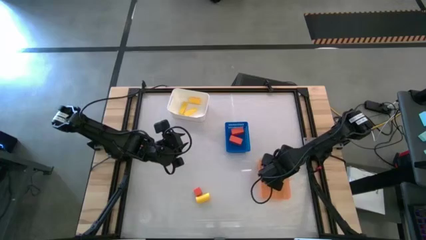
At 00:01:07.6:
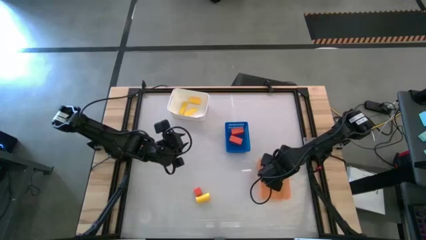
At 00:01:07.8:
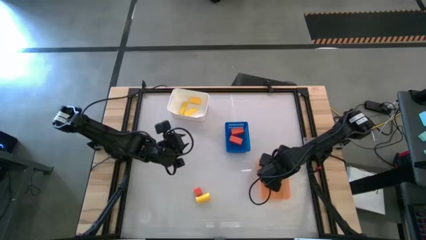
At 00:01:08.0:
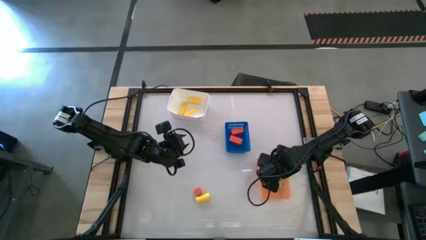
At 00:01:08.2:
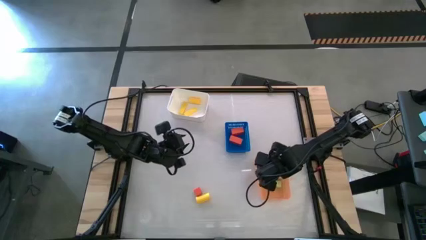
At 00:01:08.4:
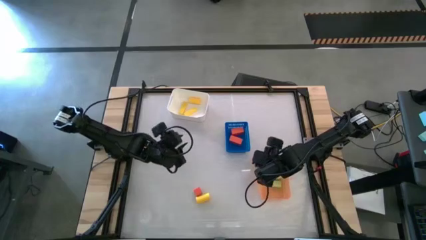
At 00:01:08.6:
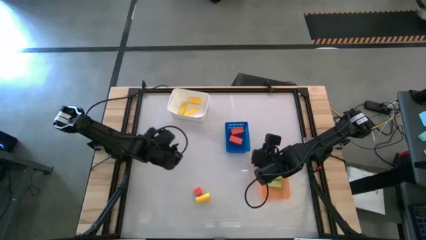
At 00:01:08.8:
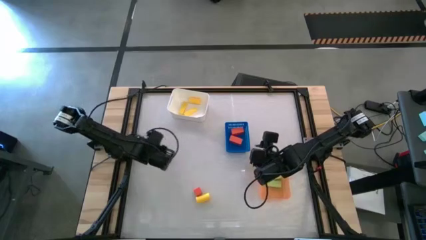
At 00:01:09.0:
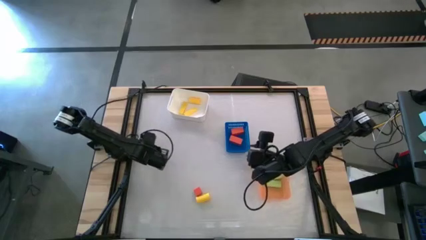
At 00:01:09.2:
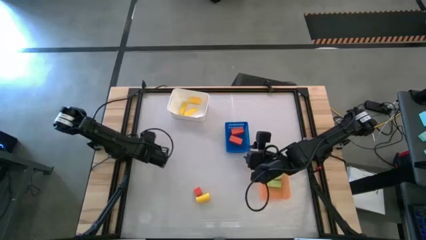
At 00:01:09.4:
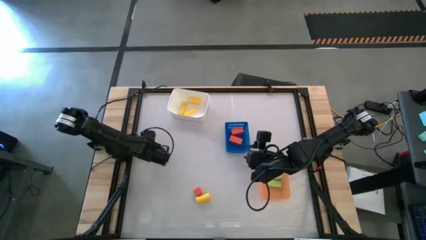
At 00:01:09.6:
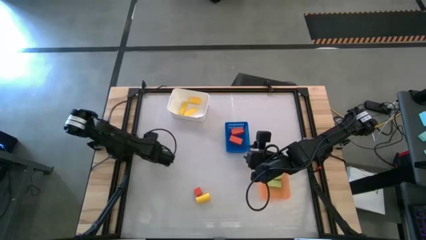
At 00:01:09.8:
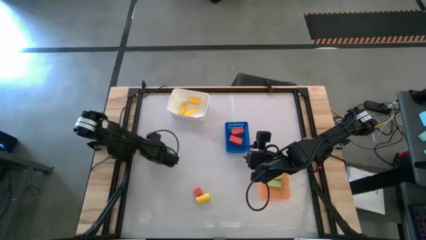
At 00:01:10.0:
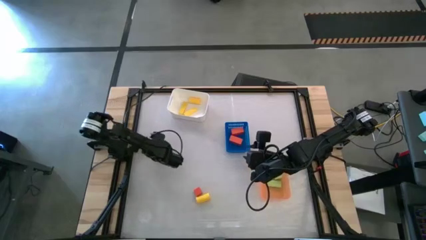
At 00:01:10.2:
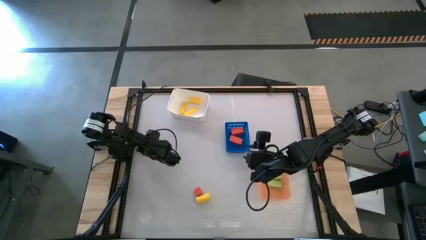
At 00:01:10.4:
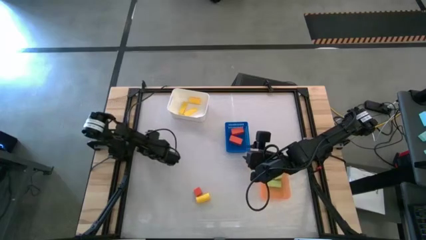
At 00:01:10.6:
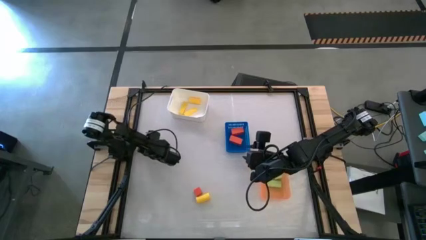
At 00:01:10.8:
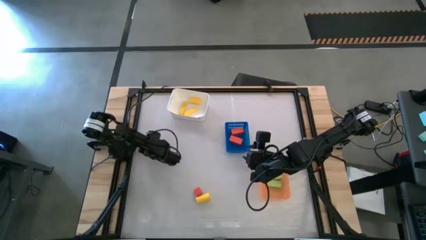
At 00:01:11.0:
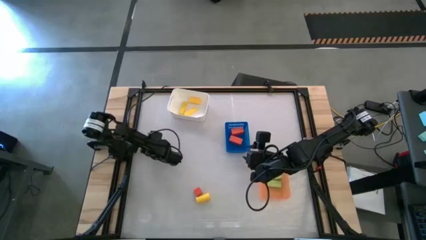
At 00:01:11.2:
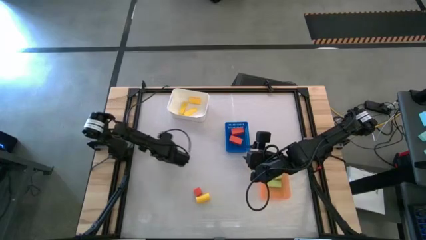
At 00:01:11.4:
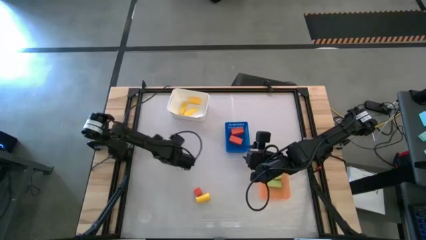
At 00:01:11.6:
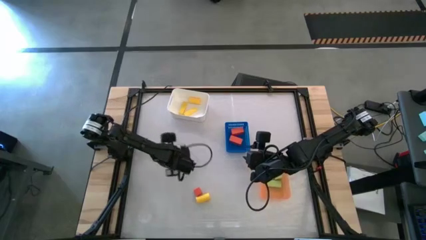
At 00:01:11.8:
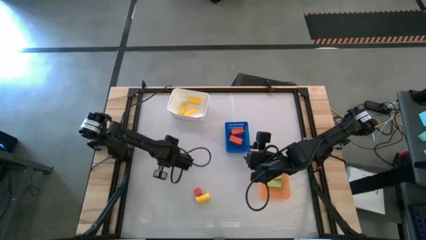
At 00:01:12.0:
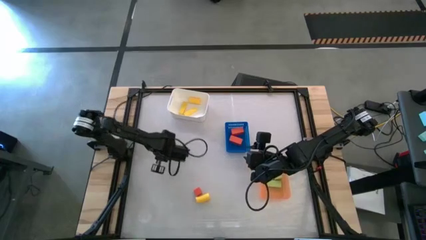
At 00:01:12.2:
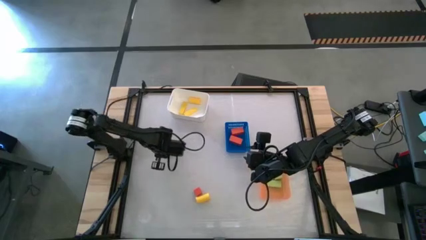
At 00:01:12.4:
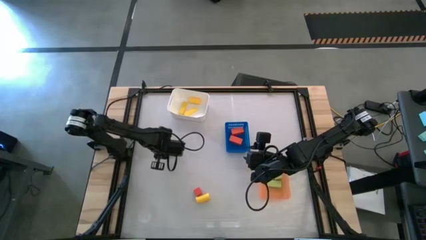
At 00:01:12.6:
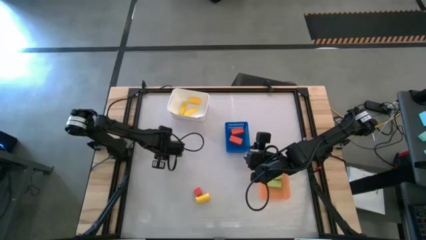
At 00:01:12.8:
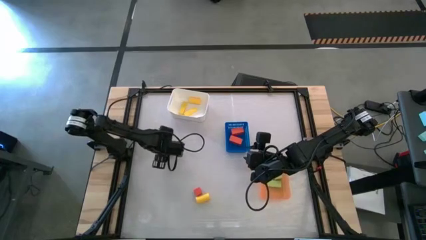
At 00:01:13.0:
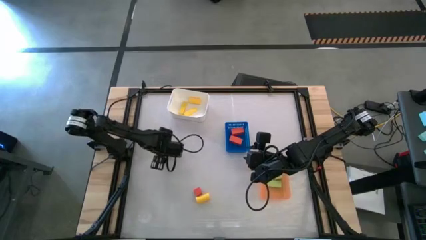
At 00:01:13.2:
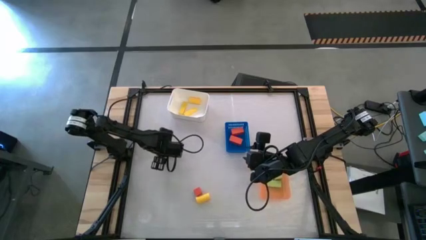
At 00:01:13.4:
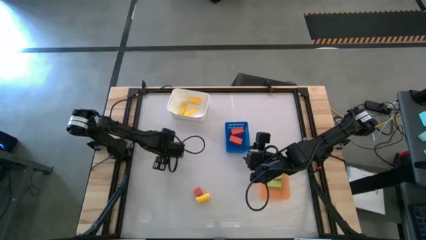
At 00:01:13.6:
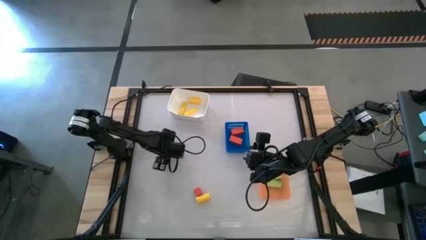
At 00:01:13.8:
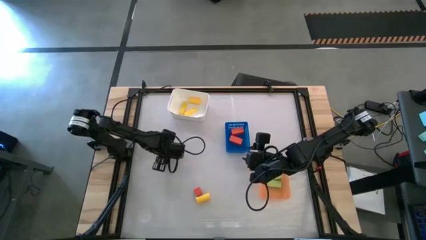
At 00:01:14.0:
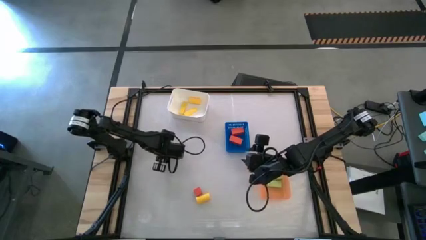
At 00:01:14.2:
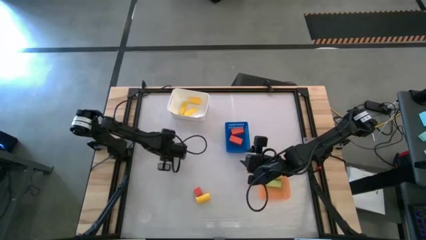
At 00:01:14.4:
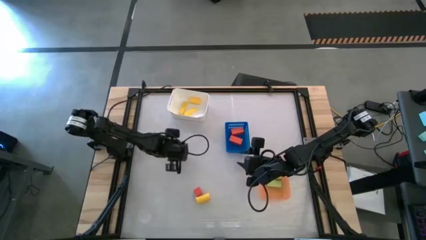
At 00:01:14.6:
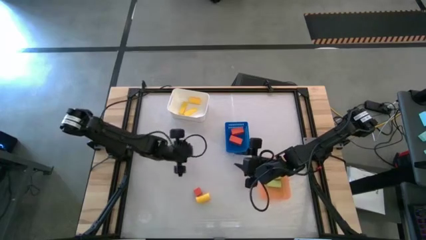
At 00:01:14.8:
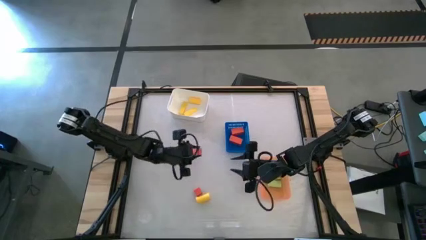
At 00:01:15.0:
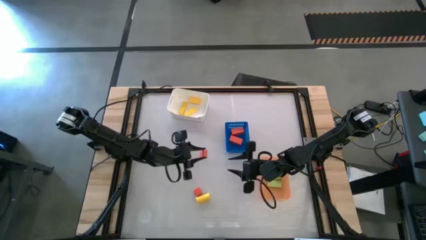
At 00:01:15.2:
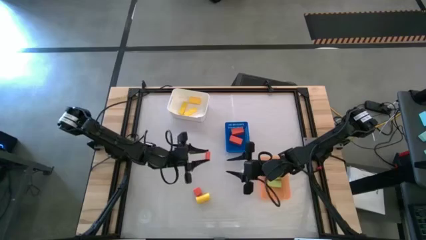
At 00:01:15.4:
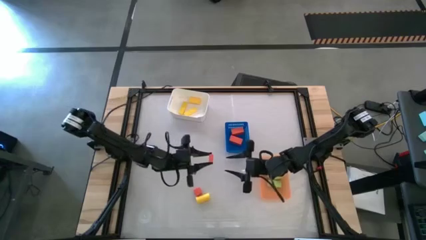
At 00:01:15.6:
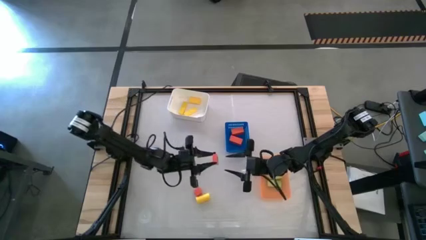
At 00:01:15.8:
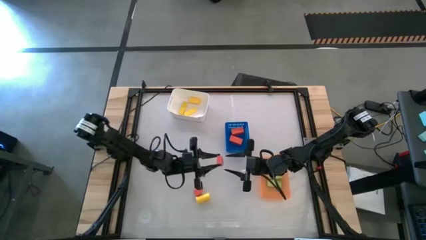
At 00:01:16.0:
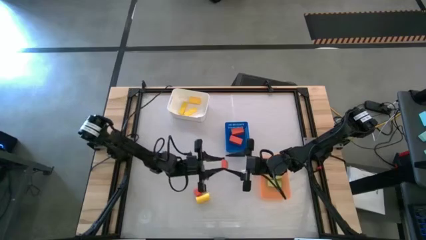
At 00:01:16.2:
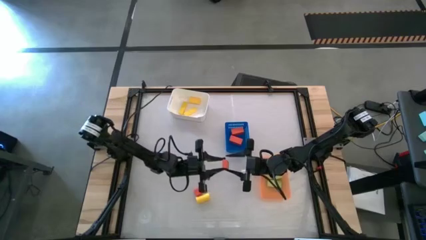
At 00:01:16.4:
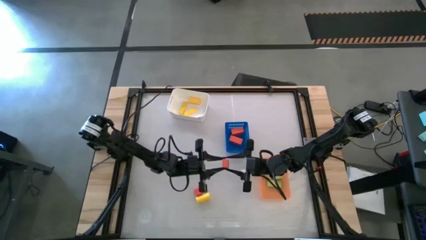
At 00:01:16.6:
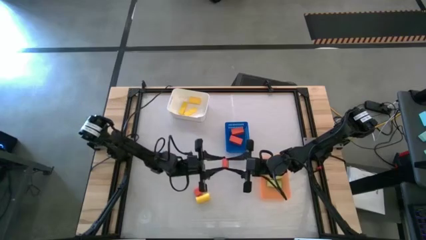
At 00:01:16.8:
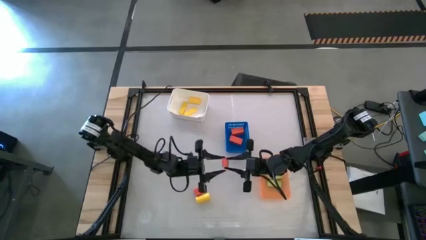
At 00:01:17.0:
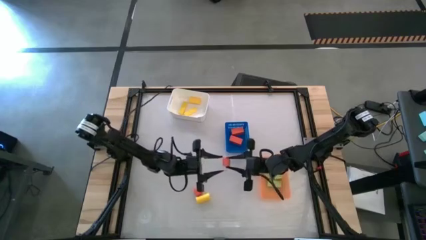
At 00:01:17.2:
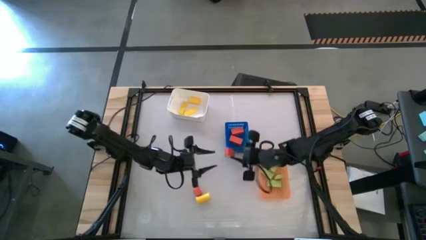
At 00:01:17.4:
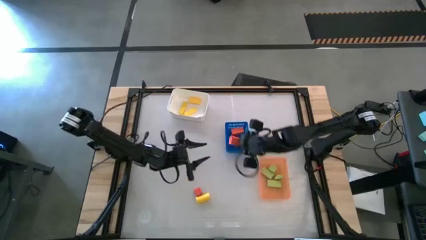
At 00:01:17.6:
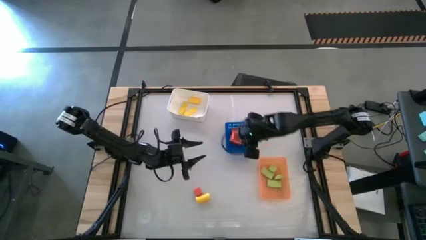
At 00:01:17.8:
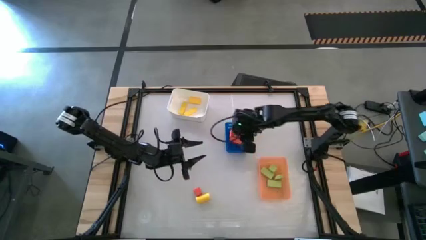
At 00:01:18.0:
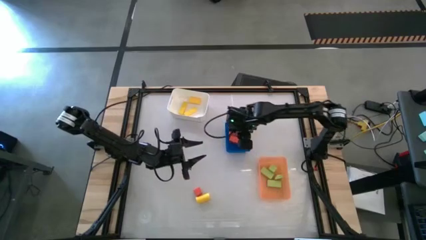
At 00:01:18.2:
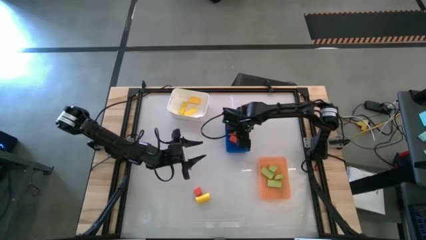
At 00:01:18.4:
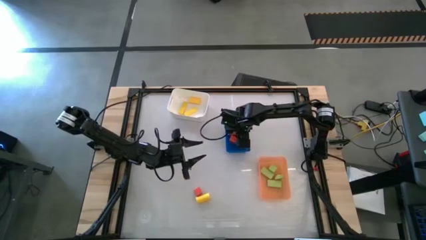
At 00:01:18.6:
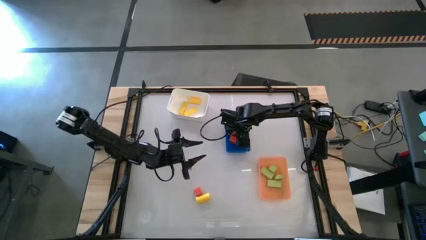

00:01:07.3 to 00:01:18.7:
Task: Sort & place blocks by color
Put the orange block into the blue bin

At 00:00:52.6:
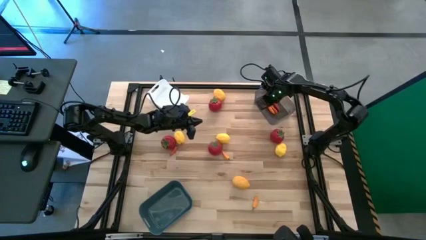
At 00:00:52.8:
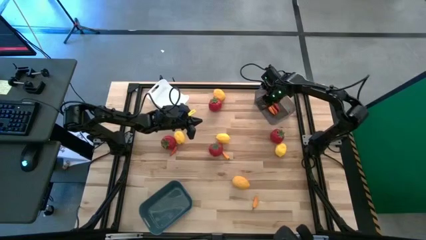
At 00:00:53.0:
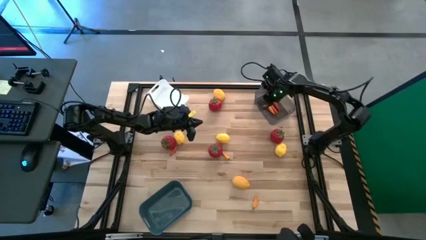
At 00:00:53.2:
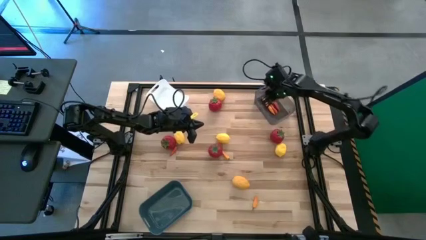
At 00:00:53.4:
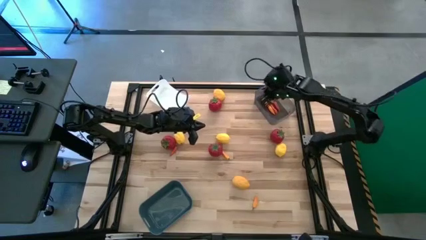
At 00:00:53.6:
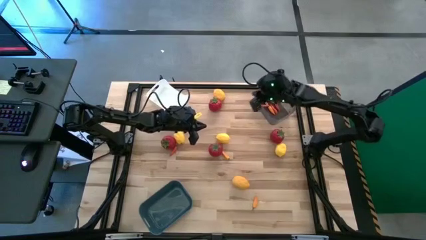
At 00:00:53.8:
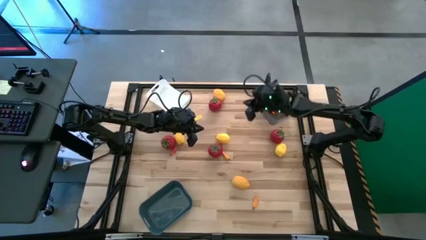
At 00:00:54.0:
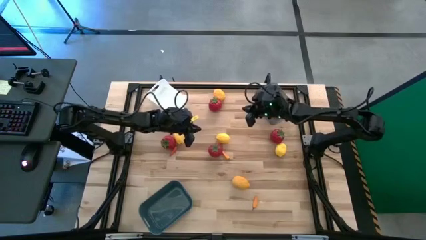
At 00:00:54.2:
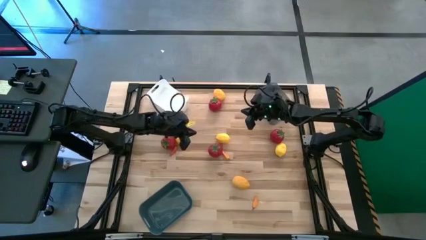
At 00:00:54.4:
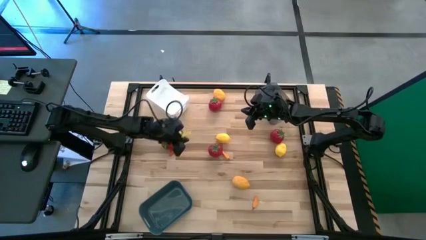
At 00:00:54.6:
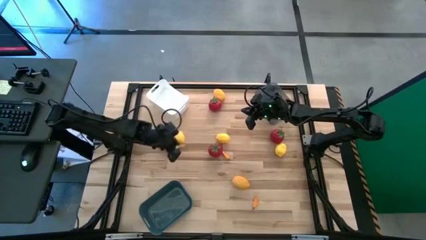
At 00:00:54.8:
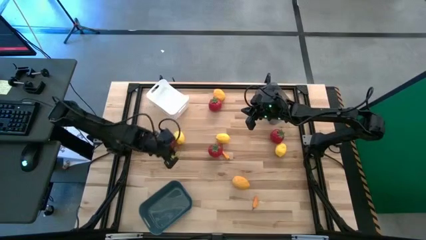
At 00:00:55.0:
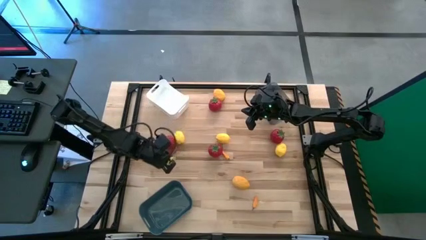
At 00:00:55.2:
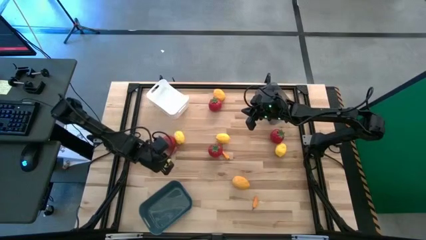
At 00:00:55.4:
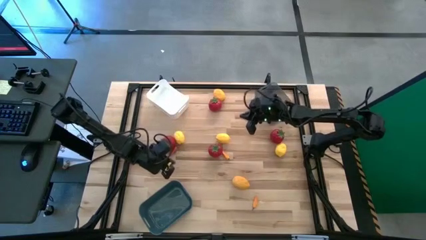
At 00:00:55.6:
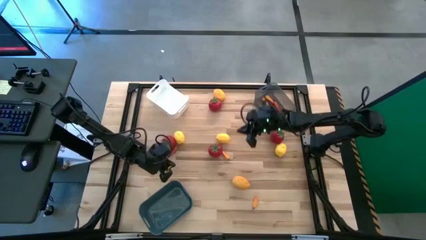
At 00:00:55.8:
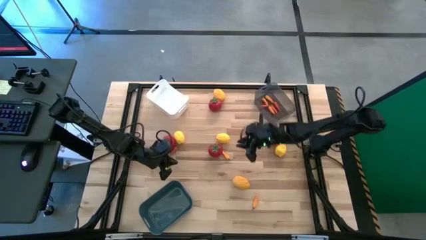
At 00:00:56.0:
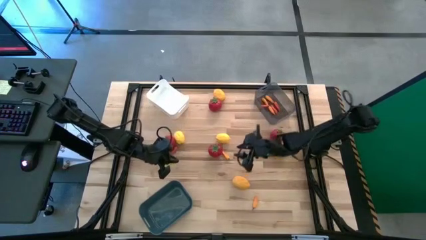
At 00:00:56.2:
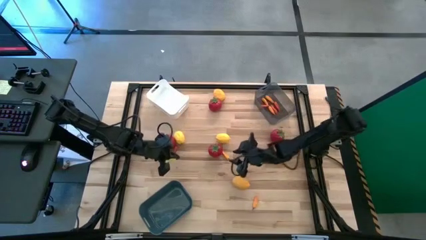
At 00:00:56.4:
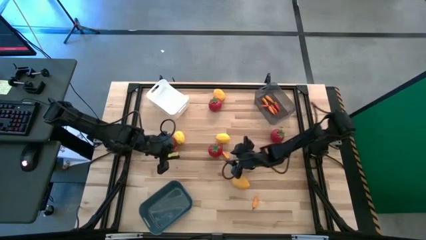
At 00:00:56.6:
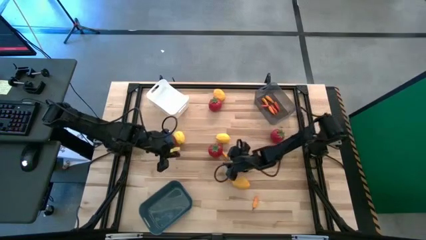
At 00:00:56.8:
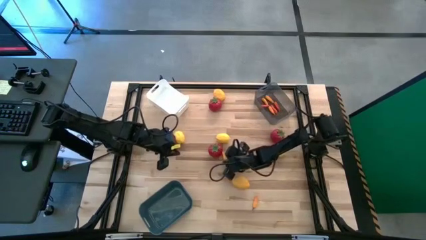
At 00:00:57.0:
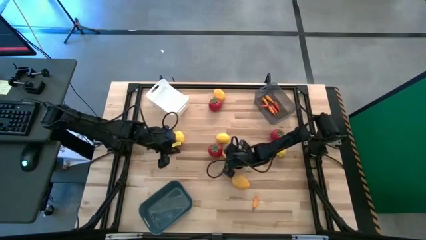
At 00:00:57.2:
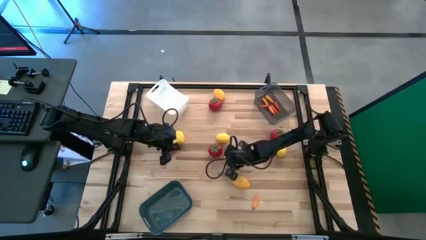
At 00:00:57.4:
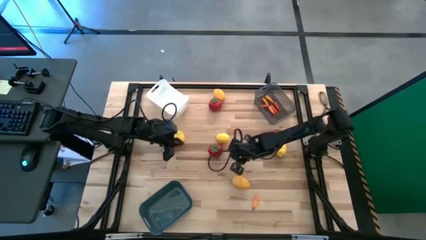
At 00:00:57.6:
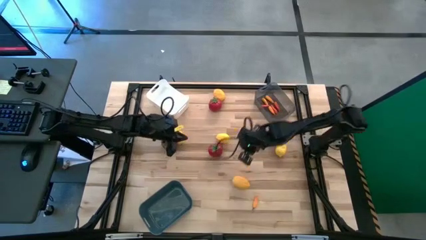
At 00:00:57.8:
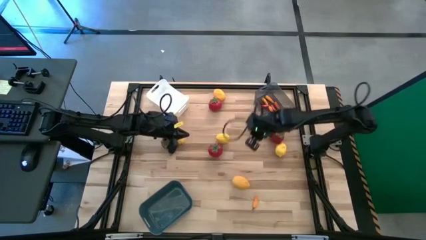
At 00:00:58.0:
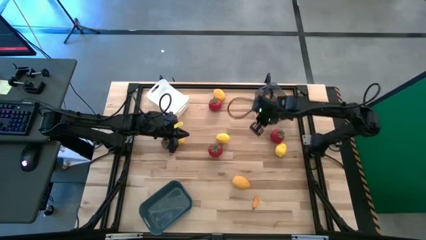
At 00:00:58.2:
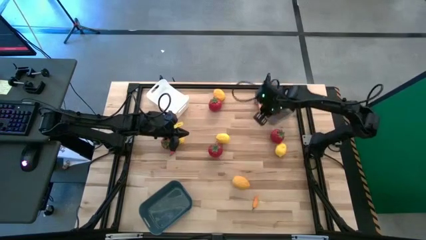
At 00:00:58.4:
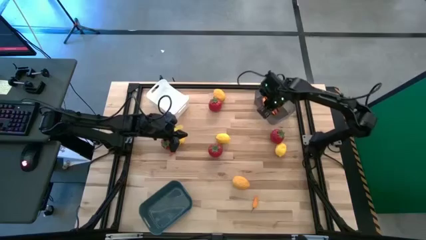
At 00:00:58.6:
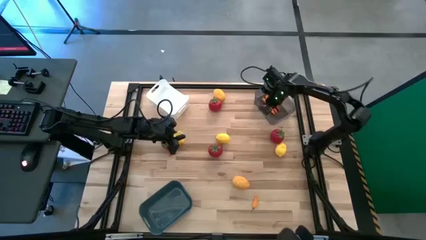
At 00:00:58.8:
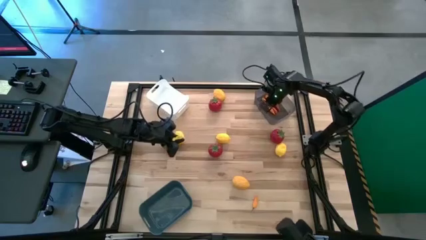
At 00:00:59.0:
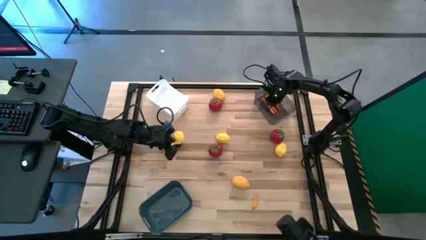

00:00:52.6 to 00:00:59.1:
Task: Sort produce into baskets
Put the orange chili pepper into the black transparent bin
